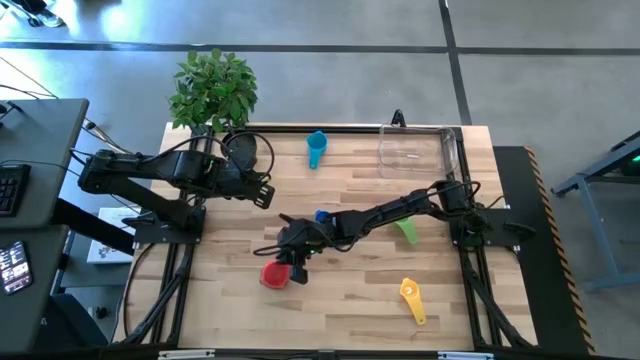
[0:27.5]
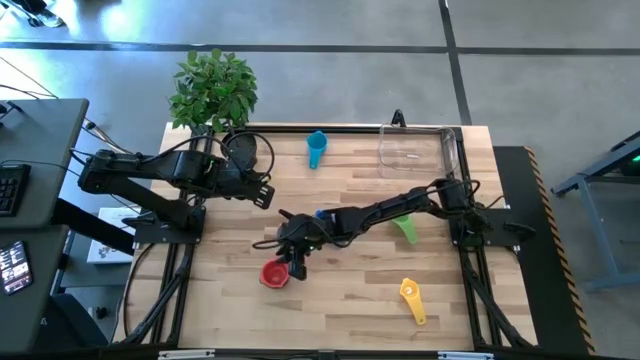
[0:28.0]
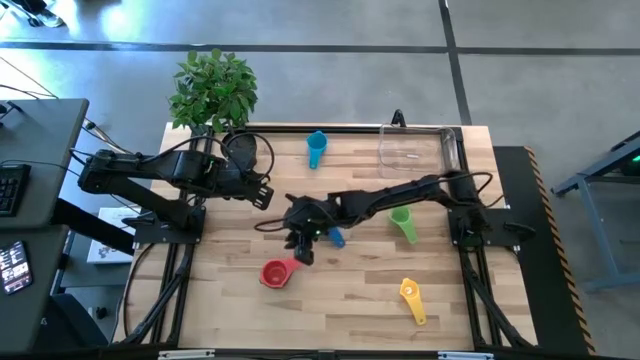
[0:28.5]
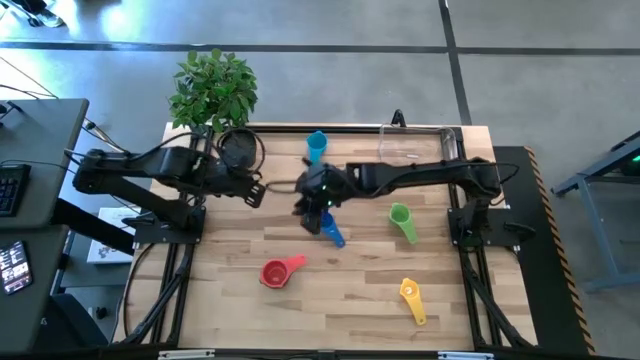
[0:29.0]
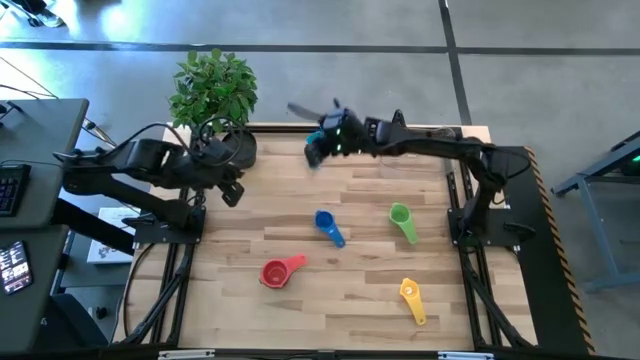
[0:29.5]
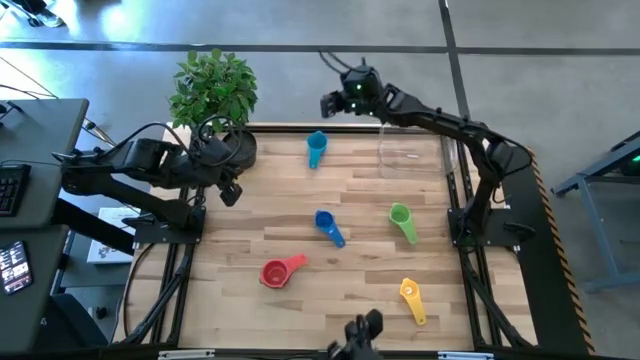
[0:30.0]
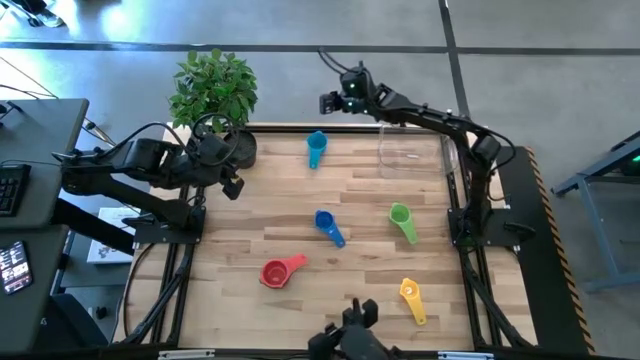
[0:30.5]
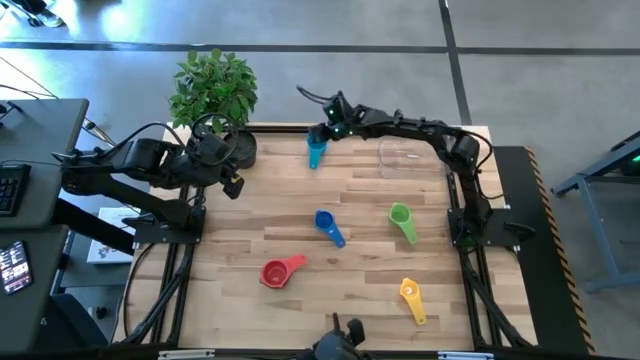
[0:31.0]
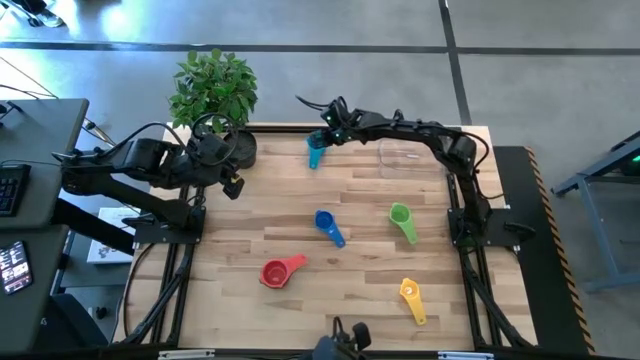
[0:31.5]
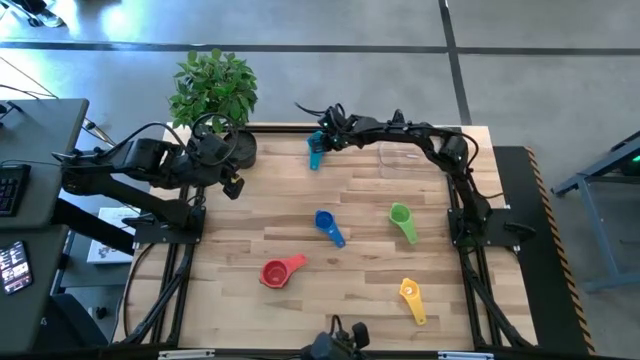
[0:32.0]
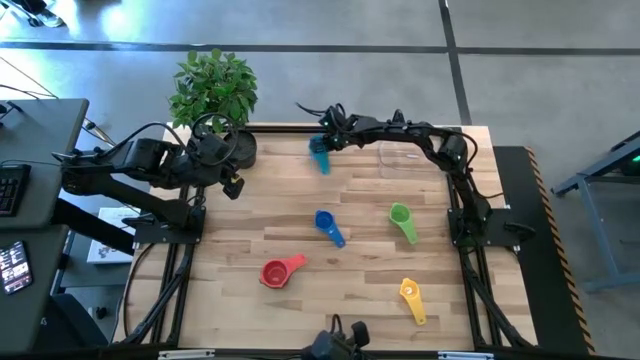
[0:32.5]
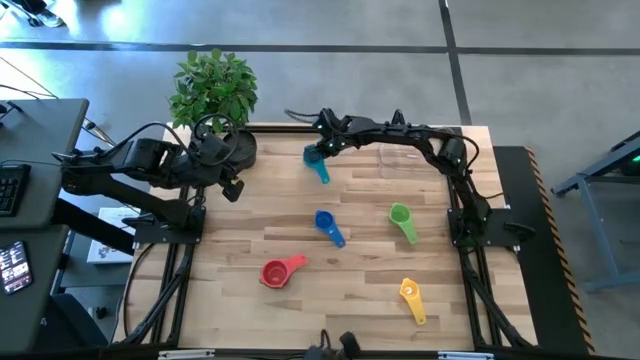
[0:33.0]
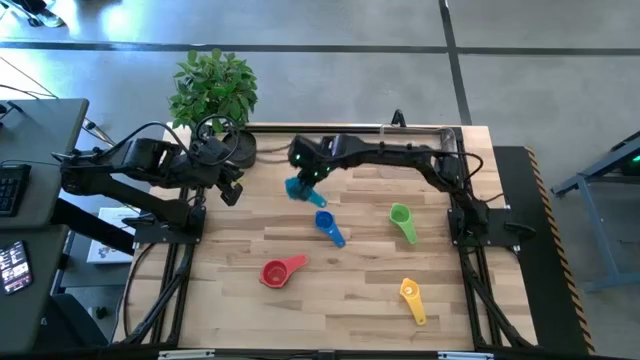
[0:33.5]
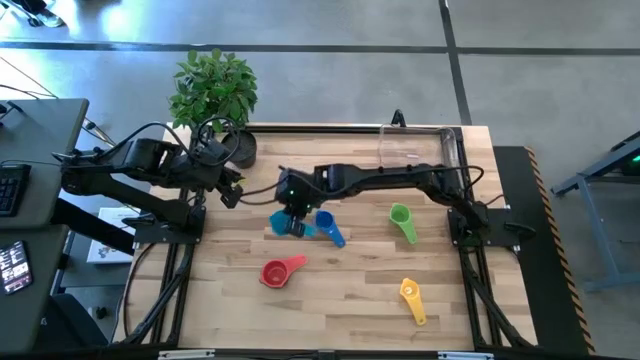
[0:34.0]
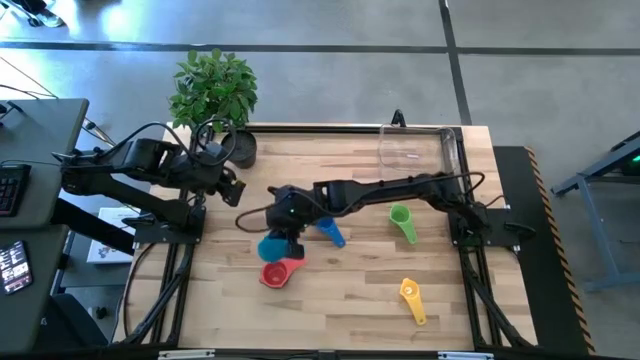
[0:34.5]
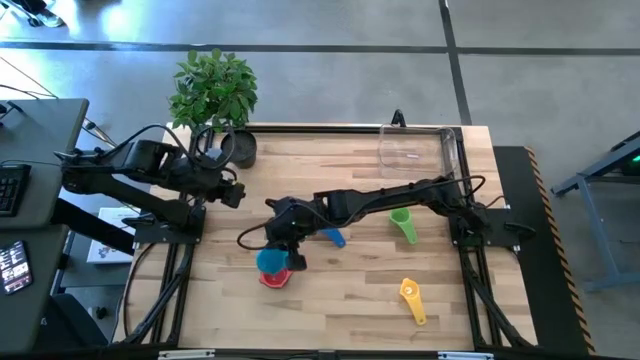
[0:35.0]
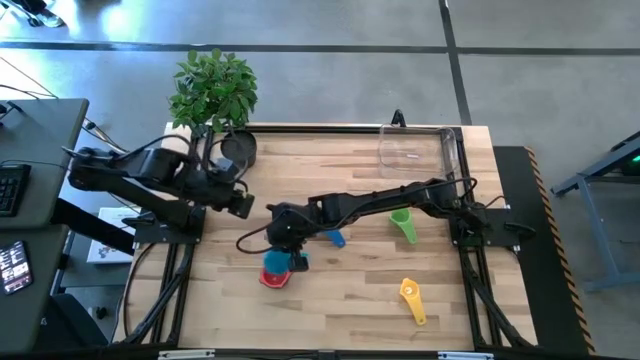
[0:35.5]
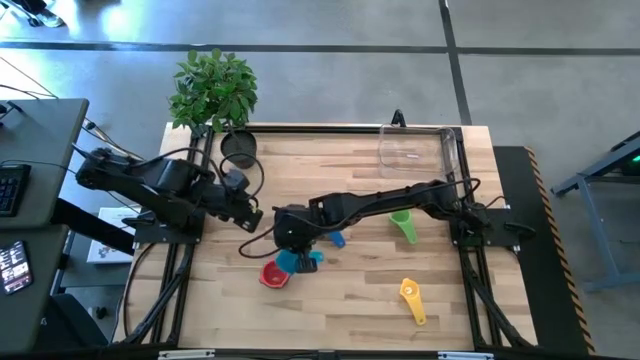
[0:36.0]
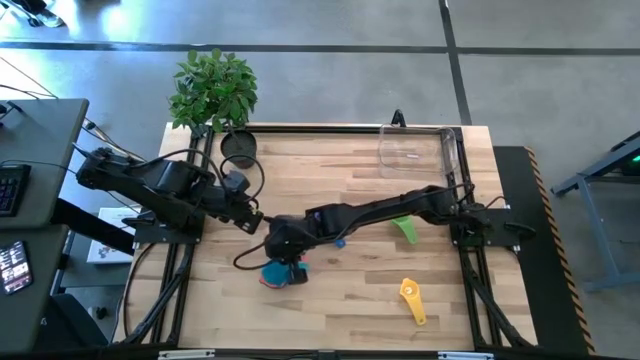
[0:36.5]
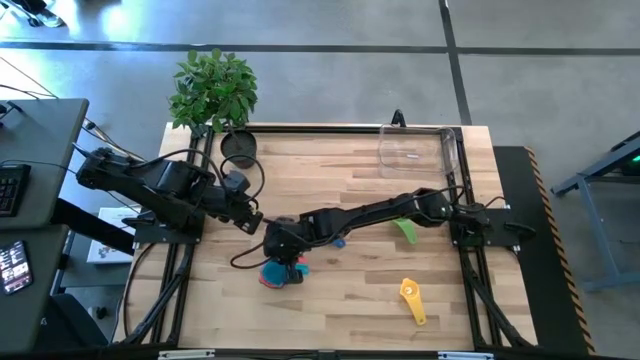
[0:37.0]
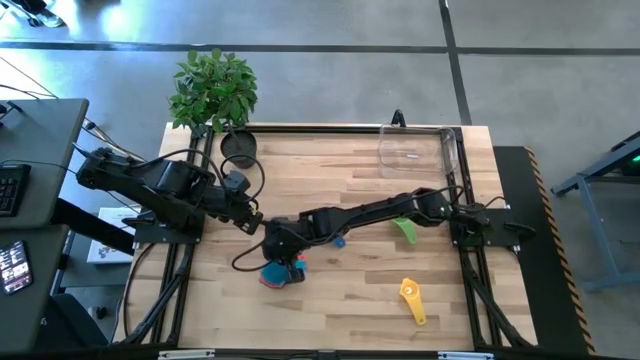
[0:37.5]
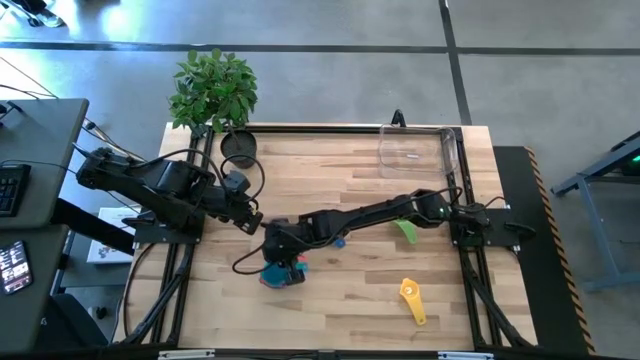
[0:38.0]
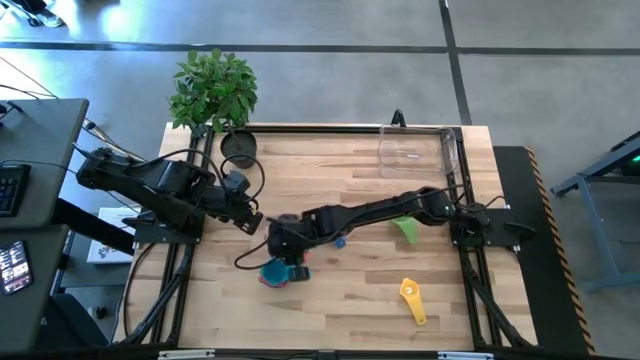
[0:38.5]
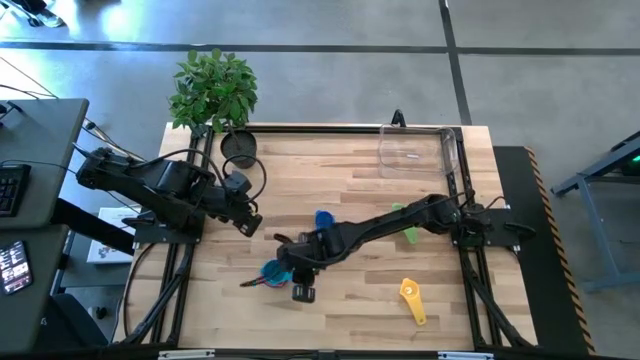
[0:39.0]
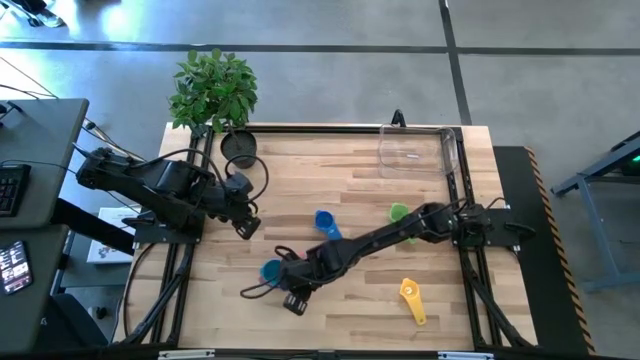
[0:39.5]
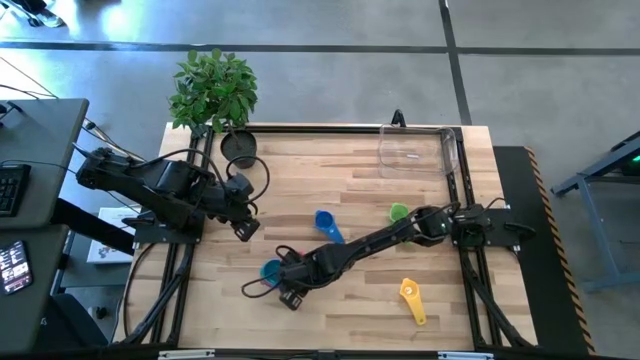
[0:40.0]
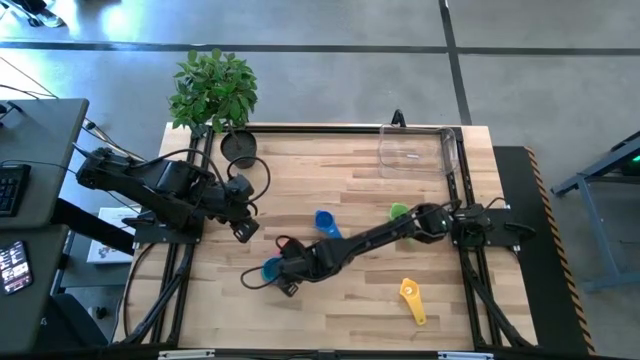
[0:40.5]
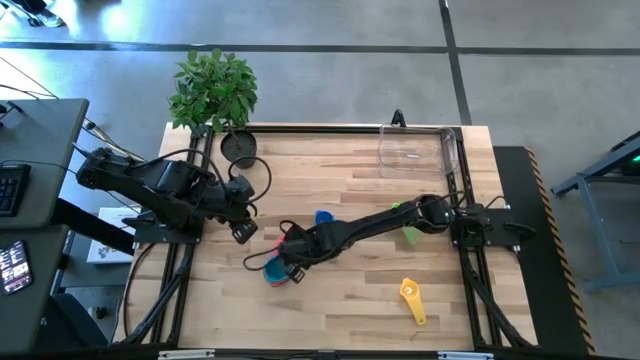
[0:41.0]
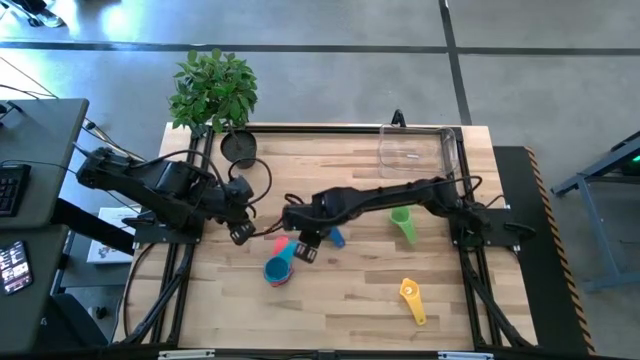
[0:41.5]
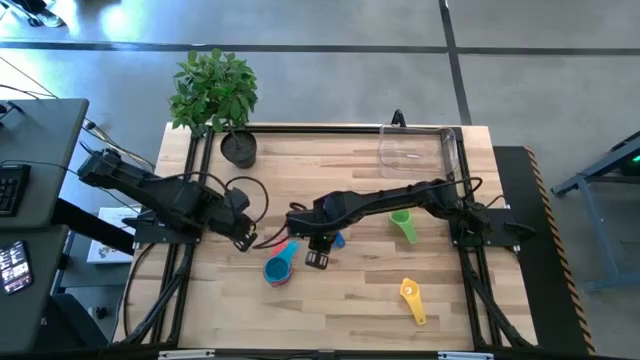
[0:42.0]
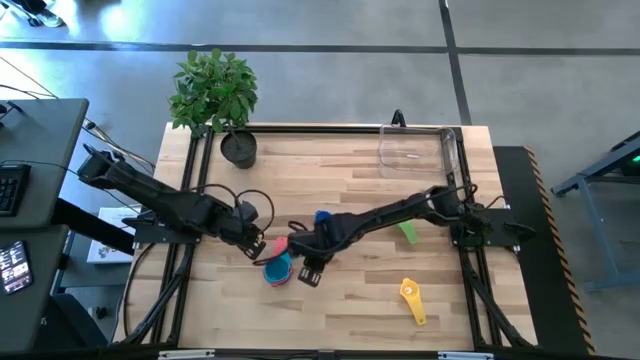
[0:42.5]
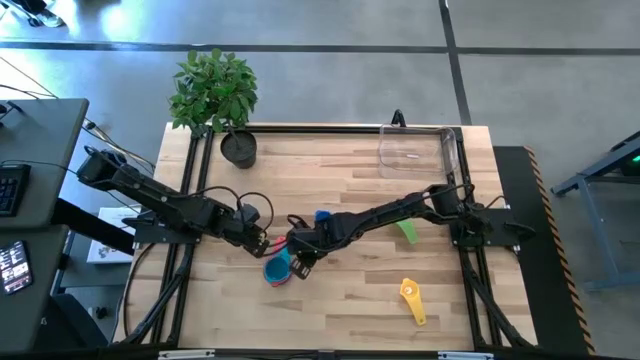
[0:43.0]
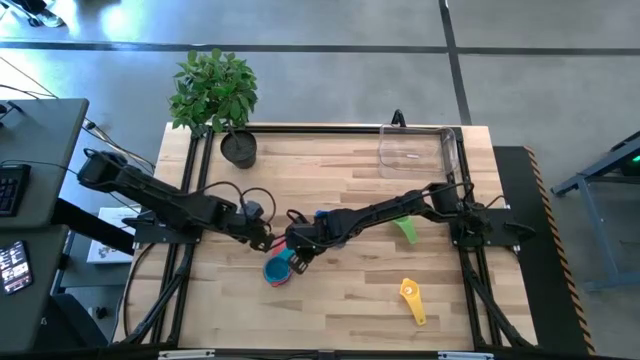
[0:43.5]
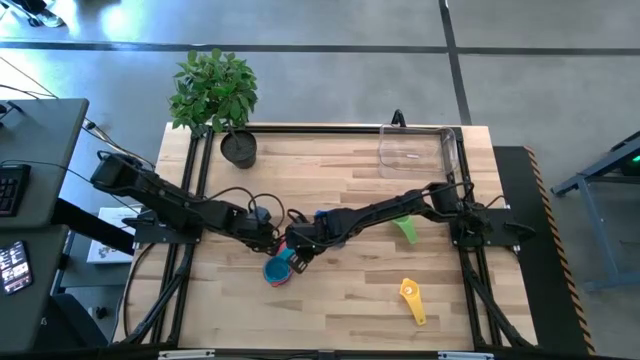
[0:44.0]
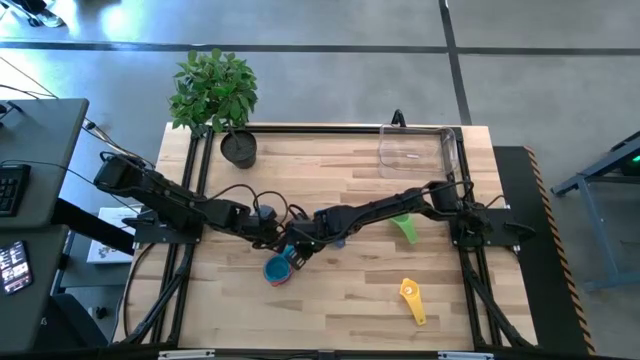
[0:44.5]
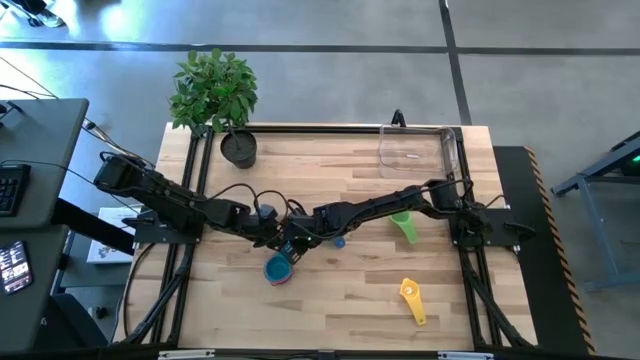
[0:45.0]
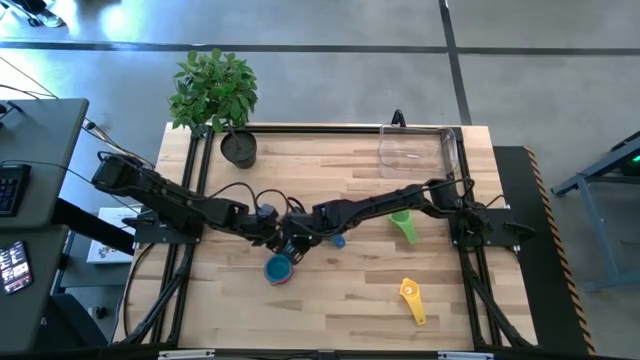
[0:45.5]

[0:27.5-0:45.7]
Task: Nest measuring cups in basket
Stack the light blue measuring cup on top of the red measuring cup

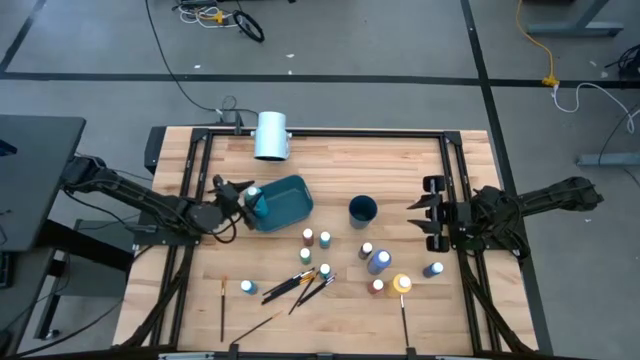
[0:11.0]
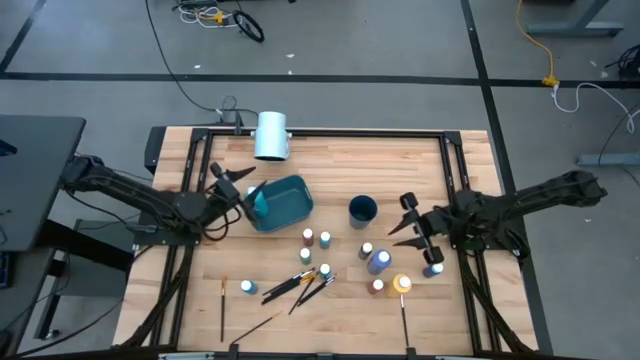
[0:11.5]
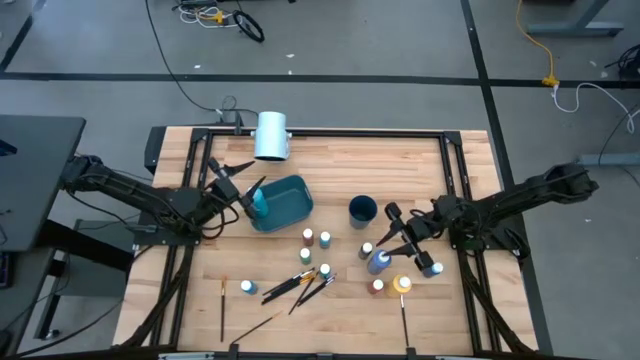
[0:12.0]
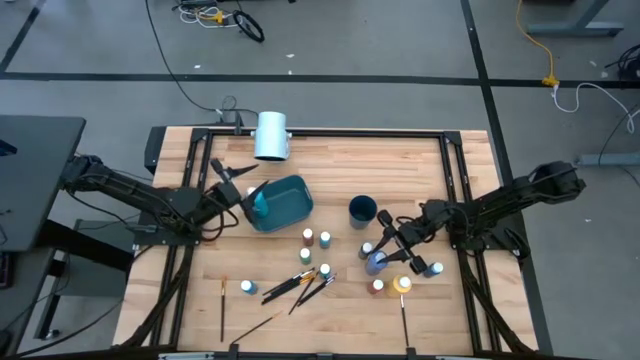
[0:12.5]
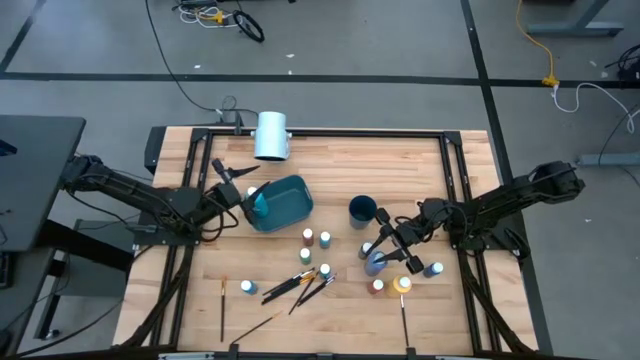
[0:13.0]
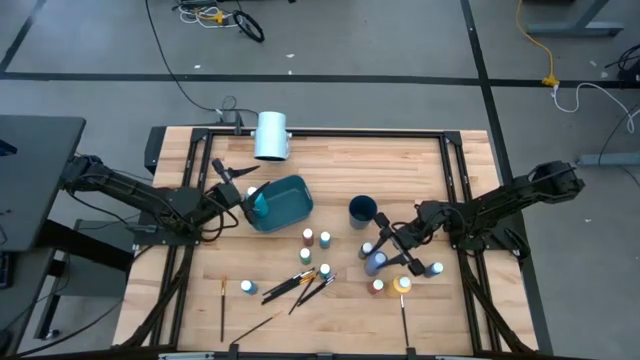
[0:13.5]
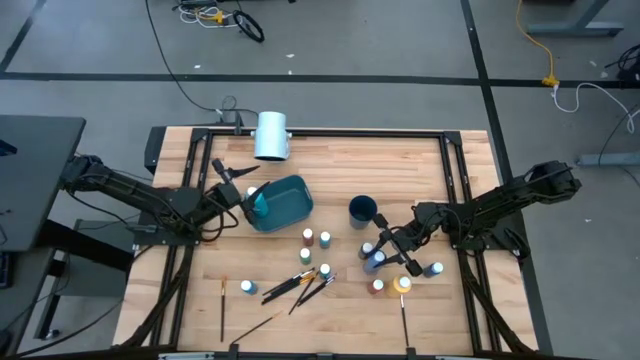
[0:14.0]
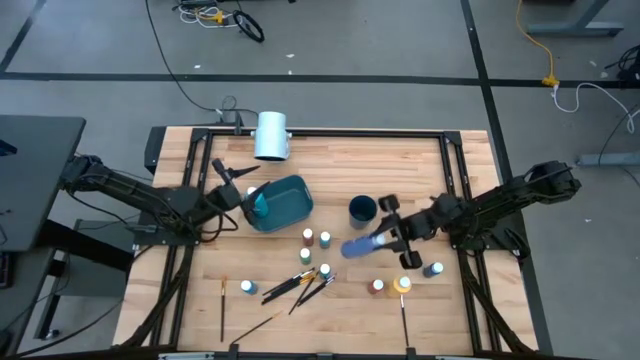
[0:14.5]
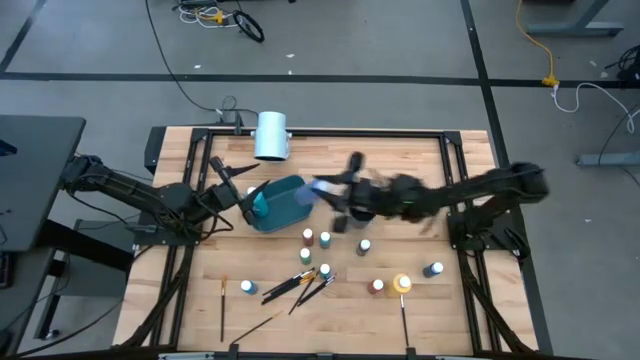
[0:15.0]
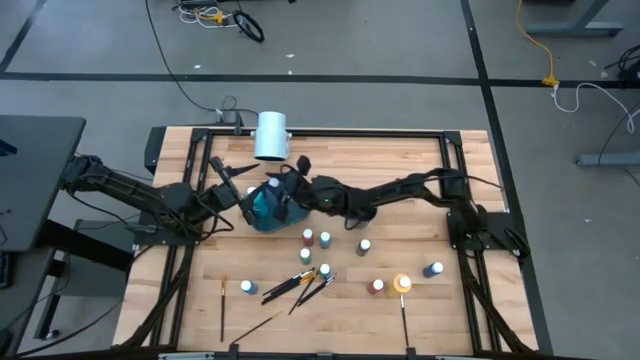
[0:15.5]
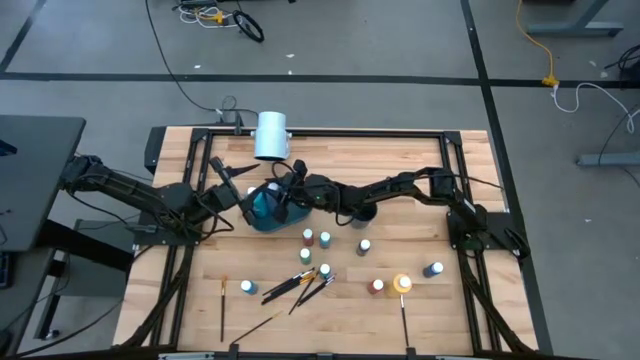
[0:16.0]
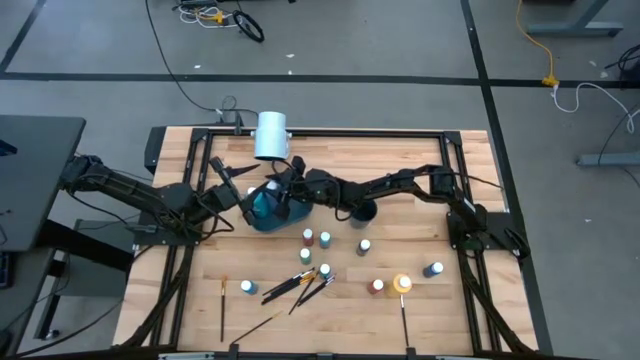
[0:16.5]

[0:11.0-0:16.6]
Task: Pick & Place Paint Supplies
Put the large violet paint bottle into the blue bin
